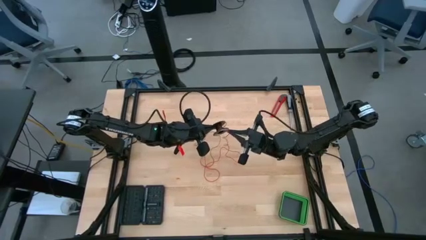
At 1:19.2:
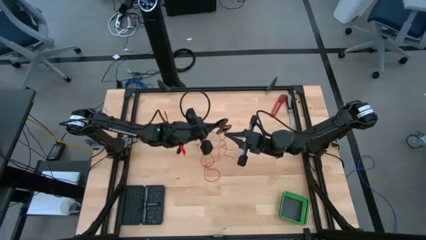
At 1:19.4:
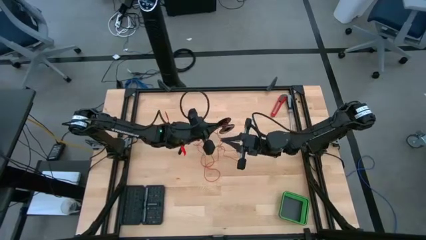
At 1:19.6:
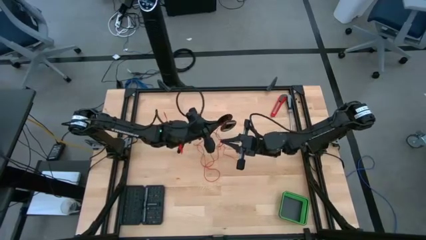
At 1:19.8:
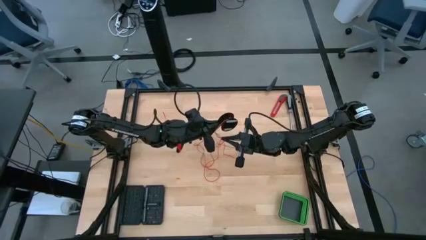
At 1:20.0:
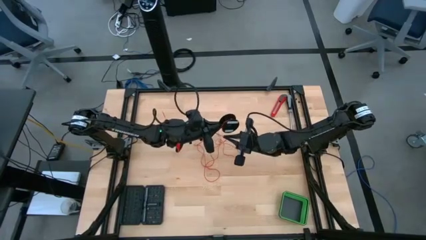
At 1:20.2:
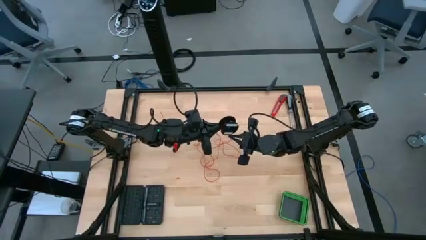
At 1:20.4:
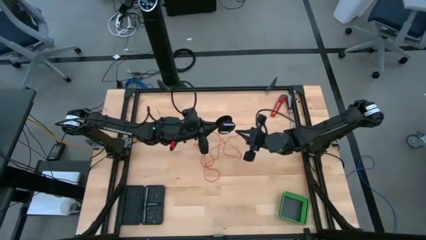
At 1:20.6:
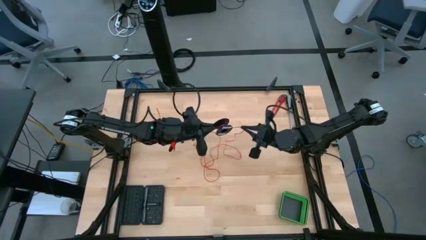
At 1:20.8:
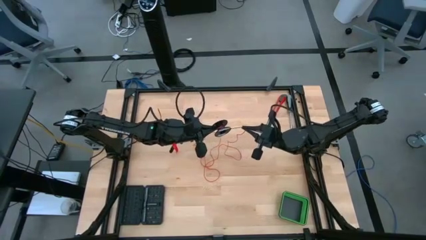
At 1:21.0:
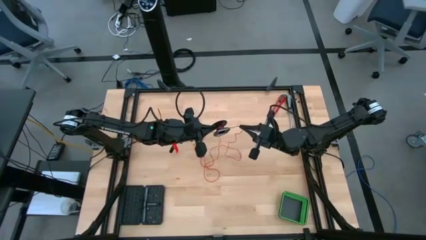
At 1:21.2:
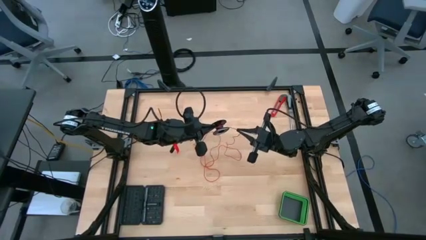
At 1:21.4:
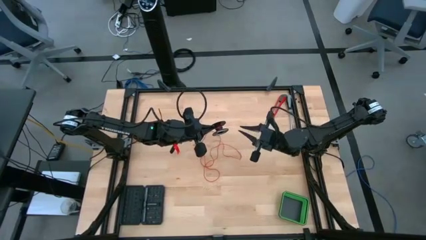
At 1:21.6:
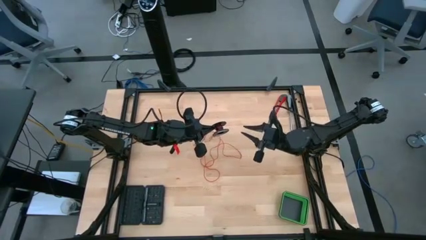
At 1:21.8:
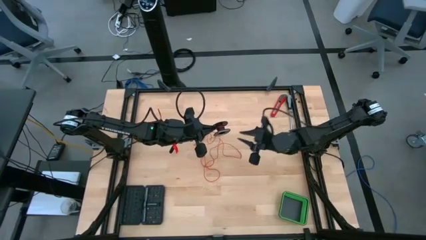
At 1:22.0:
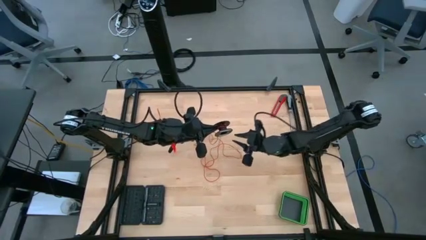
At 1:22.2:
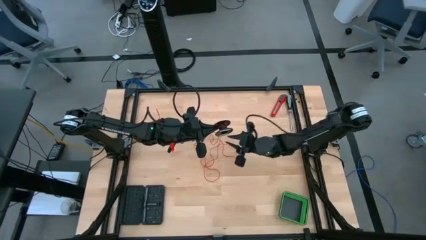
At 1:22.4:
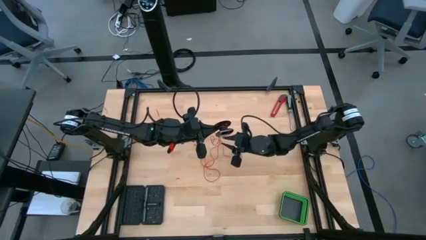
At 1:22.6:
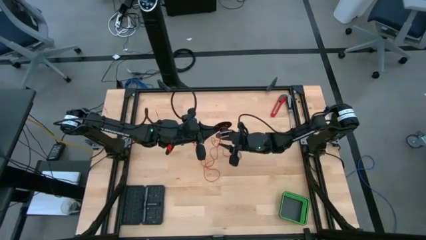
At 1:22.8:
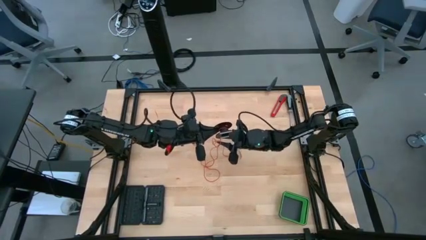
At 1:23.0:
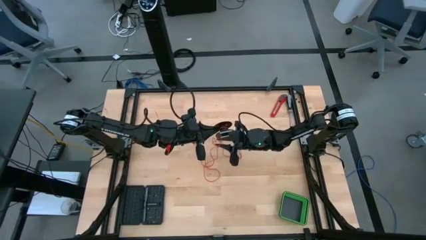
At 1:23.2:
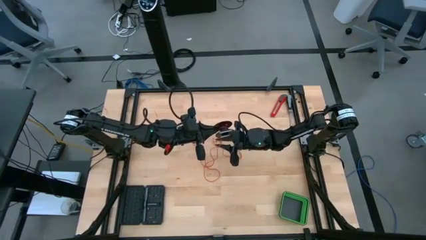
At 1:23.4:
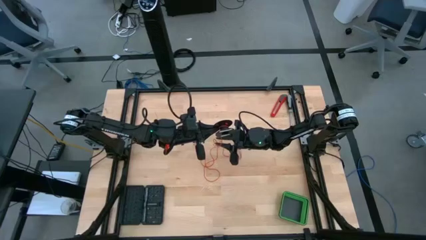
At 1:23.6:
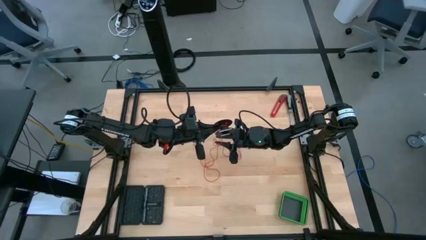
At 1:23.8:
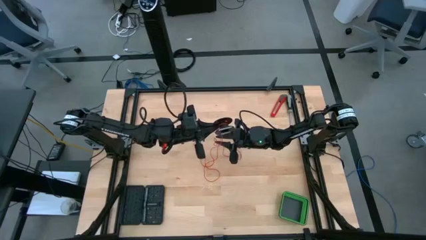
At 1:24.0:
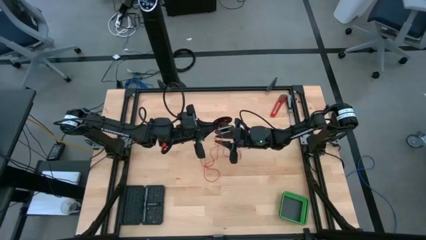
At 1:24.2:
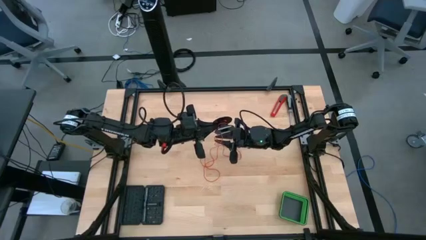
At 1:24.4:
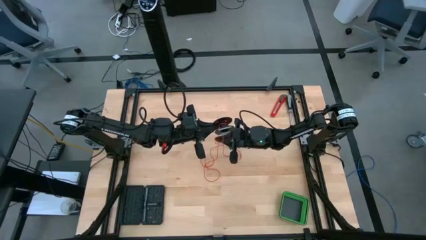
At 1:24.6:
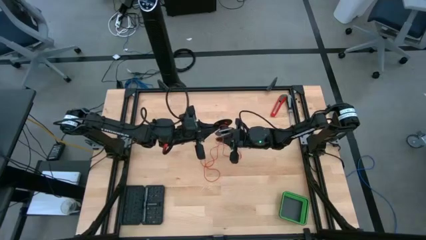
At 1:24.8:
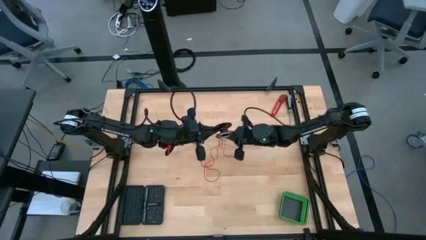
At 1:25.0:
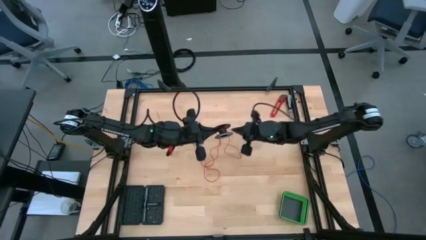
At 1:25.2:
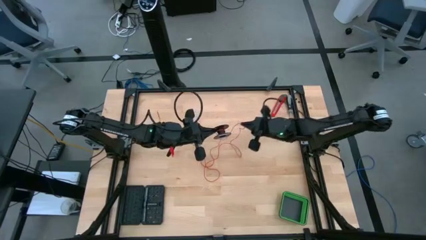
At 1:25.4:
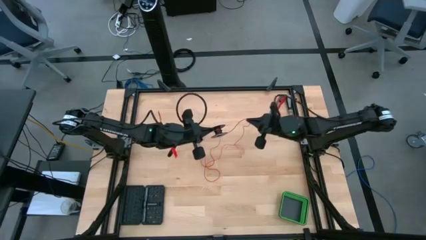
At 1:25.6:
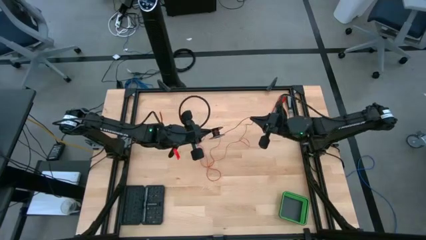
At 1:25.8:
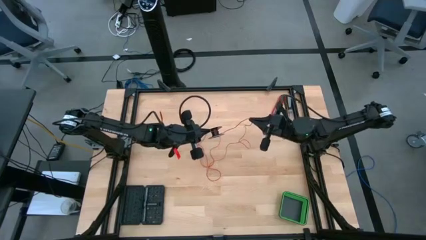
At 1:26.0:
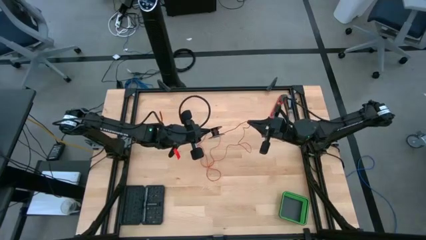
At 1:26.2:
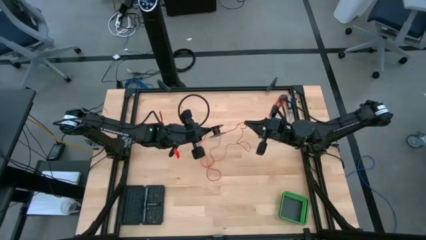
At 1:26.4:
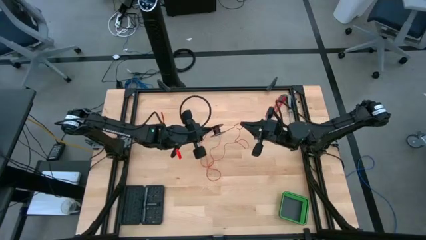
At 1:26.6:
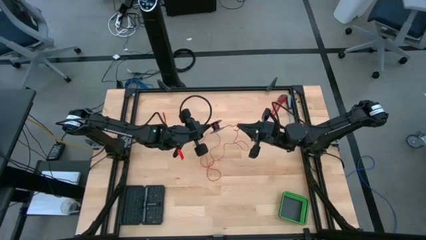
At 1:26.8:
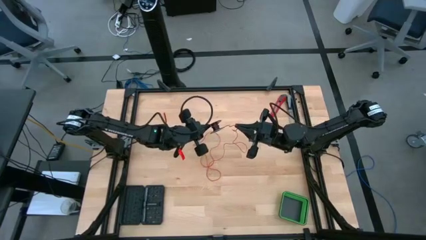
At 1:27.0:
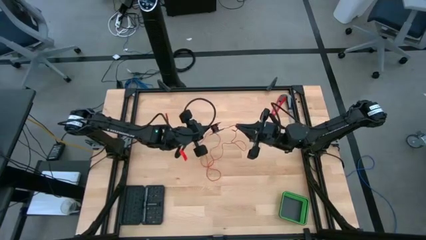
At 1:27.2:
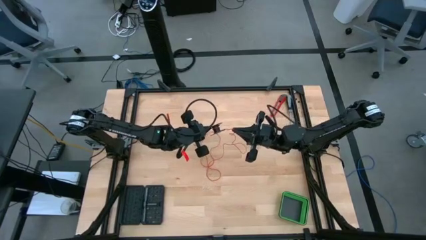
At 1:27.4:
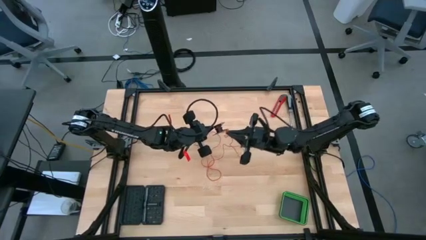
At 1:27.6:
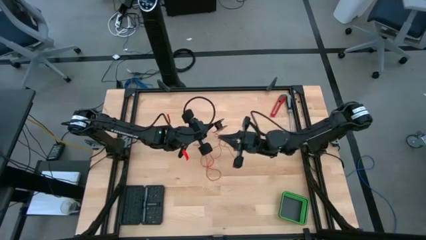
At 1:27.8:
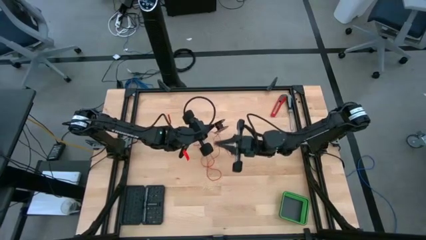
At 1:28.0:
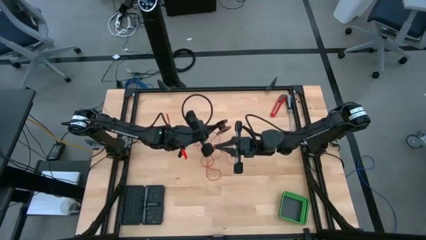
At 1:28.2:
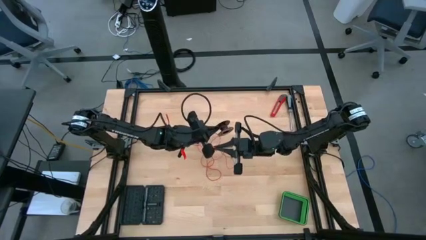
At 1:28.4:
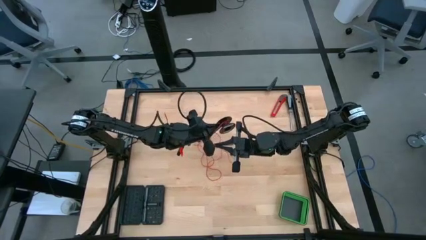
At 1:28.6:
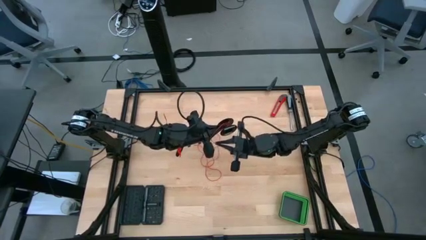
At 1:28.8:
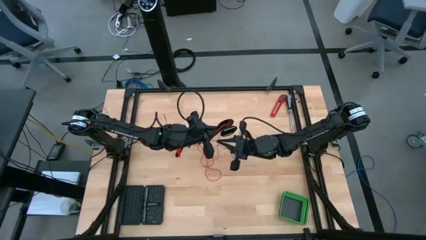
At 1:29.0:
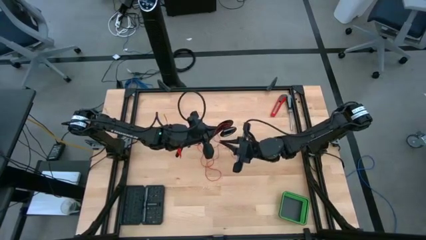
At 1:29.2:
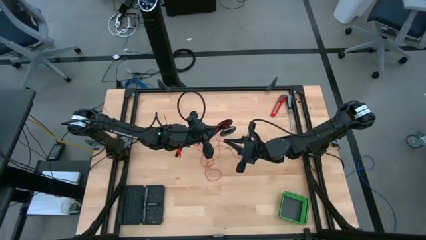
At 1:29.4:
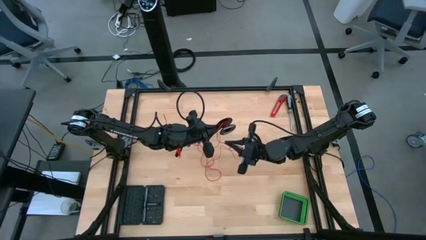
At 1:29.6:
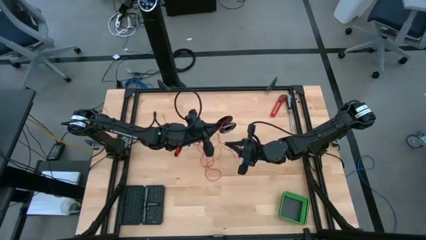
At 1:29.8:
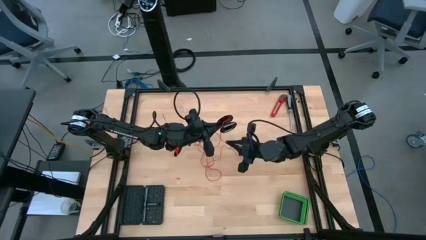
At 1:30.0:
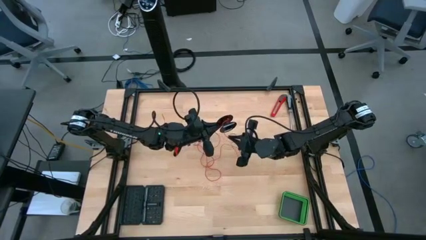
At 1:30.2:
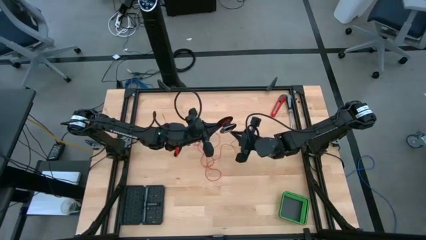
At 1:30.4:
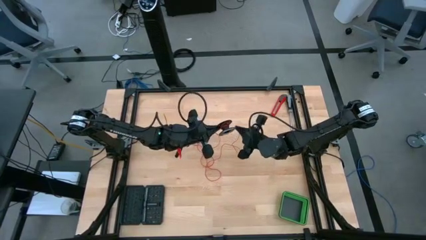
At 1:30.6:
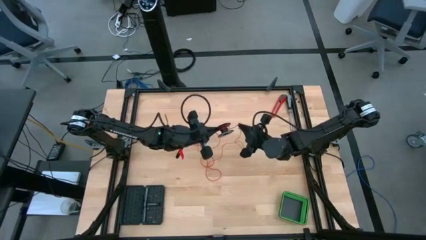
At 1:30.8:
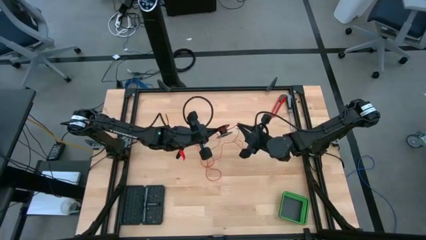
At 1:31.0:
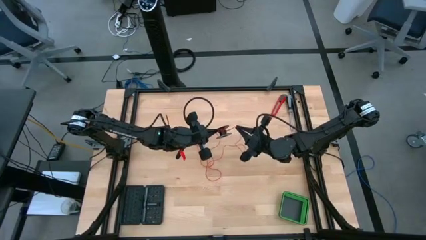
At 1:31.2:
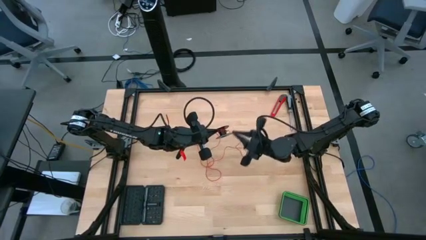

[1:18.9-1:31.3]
Task: Coil cords
Coil the red wire onto the black spool

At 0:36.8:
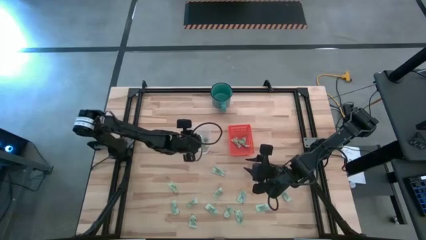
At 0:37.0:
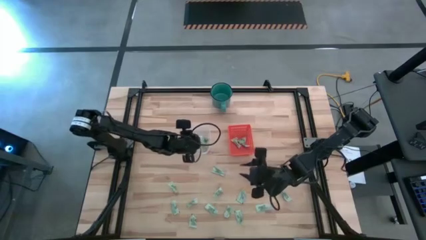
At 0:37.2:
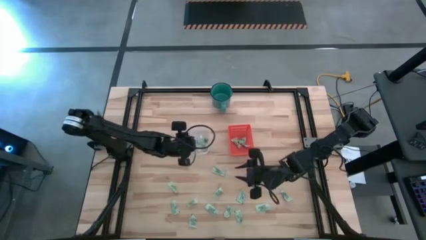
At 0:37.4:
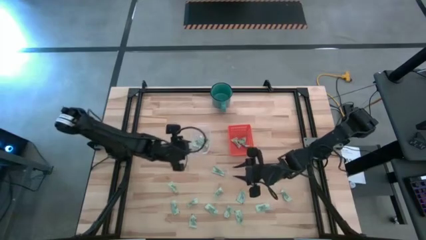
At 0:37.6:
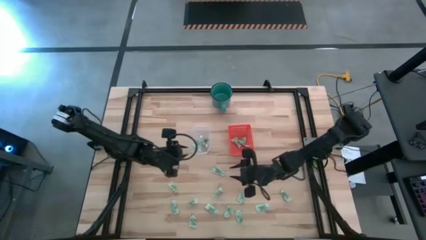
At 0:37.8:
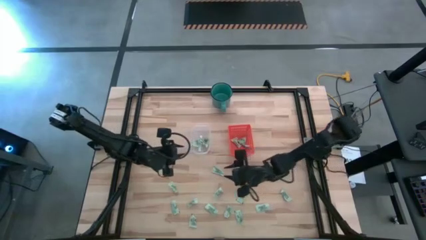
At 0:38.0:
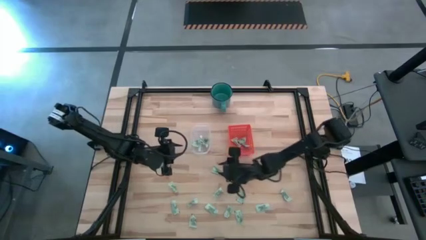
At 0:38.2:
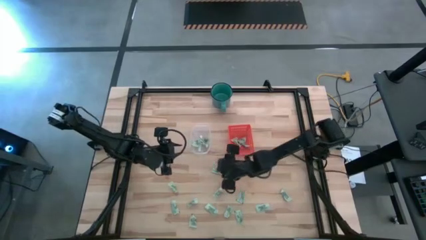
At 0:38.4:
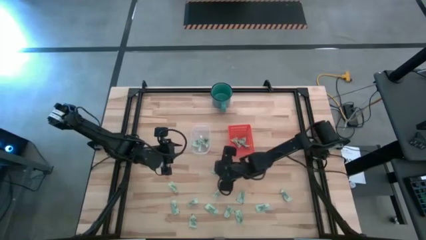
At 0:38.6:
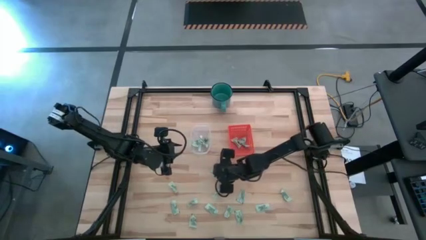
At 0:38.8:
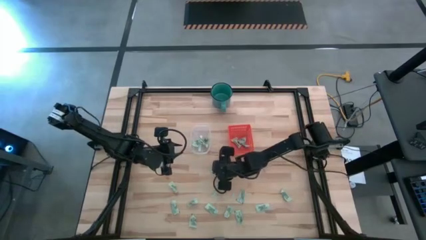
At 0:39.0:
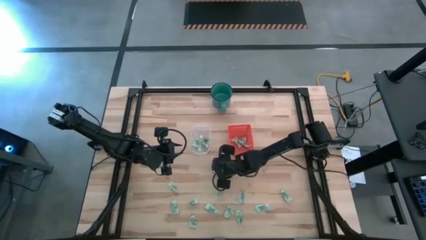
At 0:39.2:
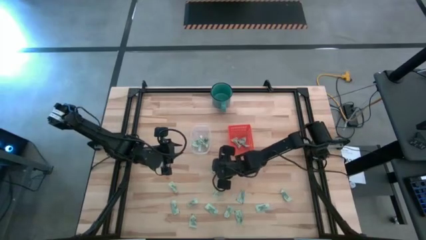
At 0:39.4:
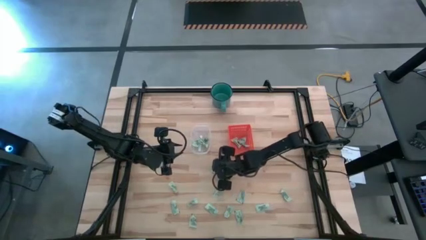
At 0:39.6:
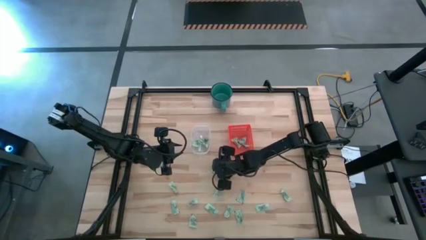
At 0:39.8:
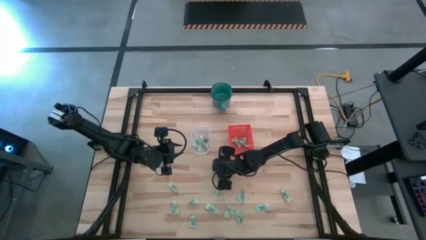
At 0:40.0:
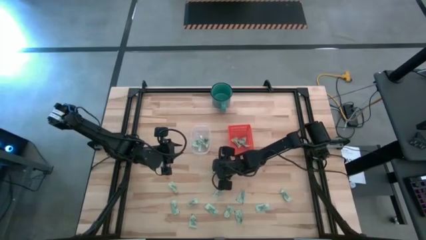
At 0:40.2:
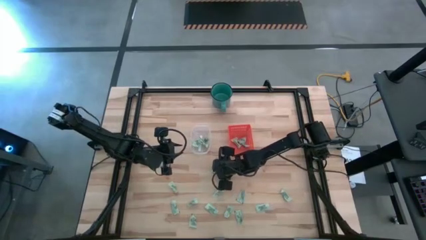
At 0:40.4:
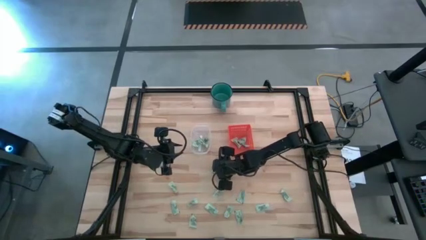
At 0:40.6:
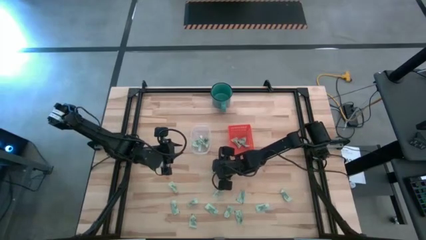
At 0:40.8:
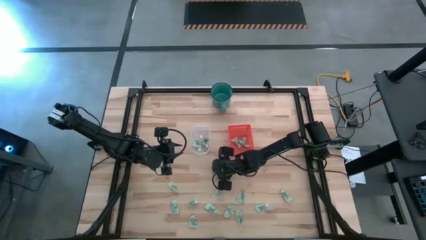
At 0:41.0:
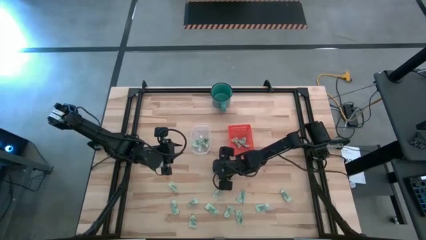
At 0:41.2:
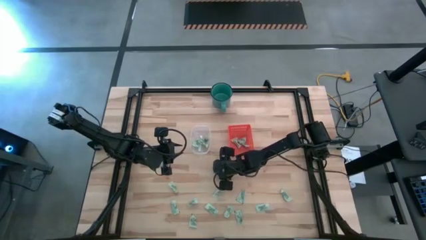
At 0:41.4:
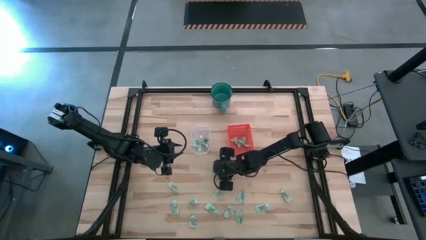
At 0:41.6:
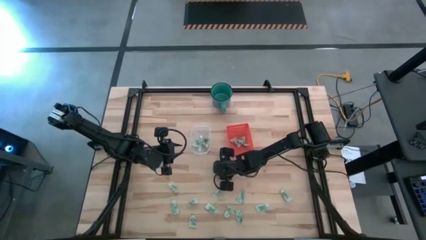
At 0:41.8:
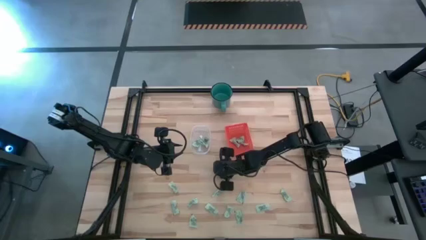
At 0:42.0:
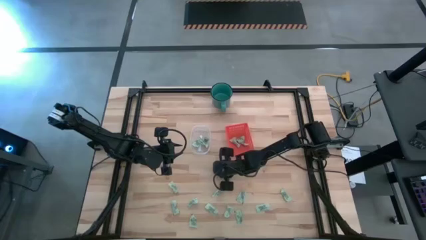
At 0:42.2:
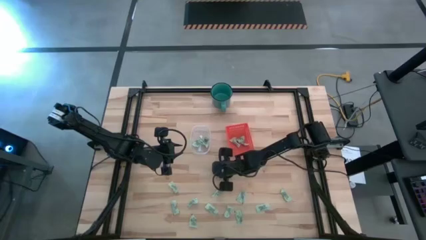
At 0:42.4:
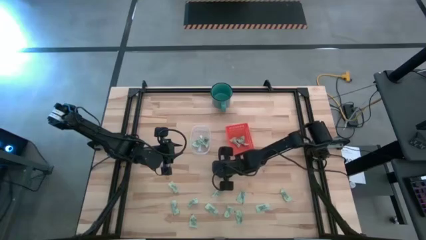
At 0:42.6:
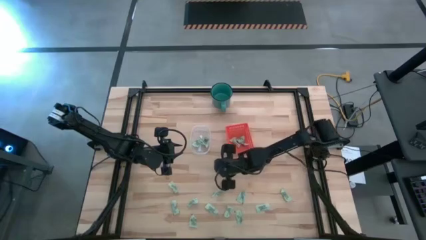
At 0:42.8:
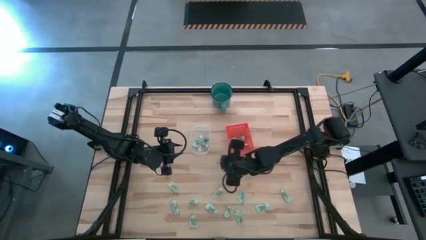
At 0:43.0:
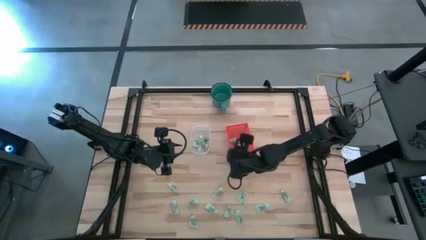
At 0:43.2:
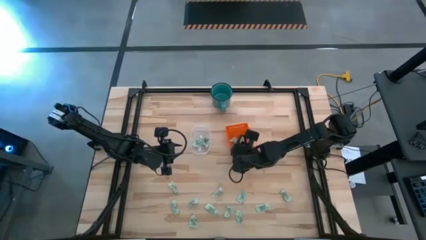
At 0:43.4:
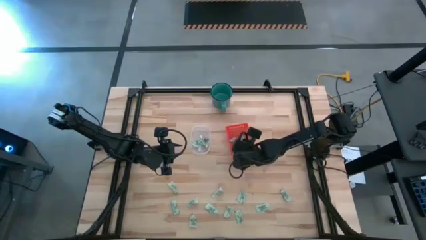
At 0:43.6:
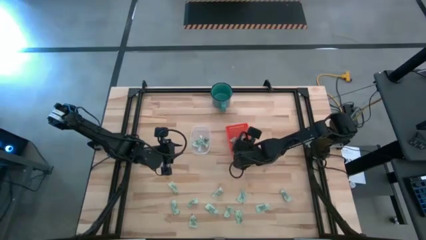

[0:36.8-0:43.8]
Task: Pick and place items into bin
Put the stevia packet into the orange bin
